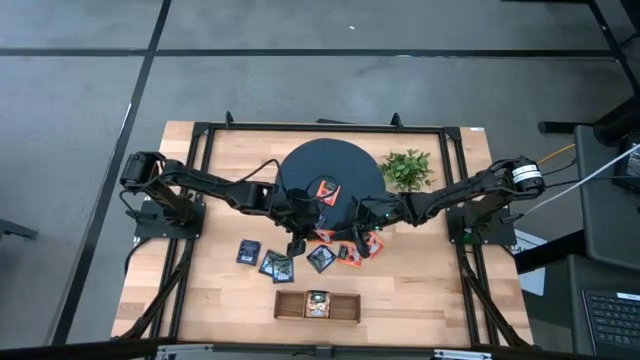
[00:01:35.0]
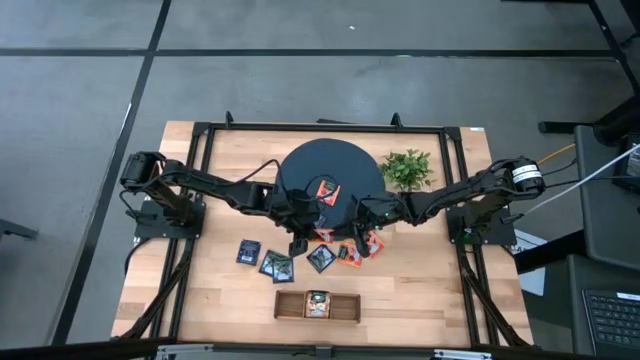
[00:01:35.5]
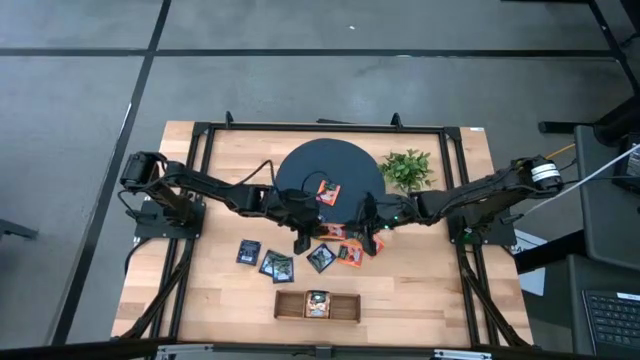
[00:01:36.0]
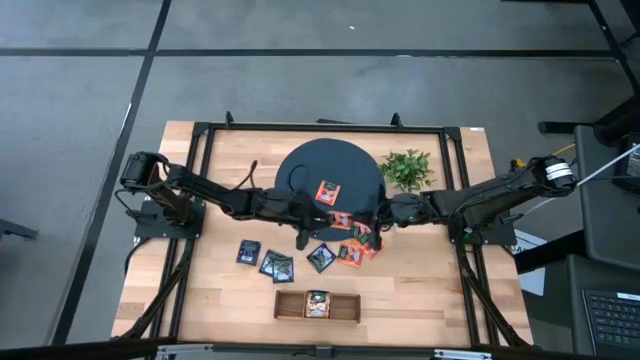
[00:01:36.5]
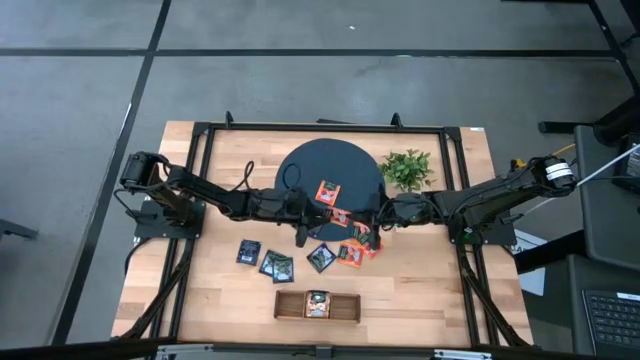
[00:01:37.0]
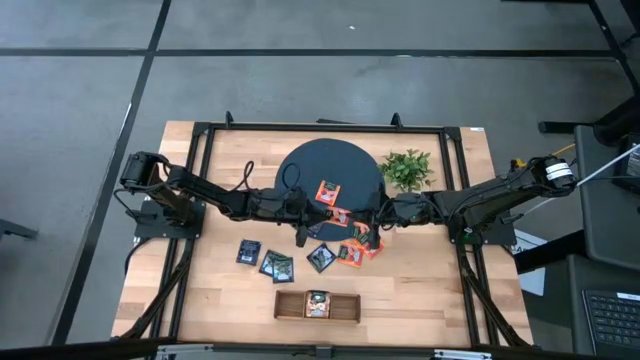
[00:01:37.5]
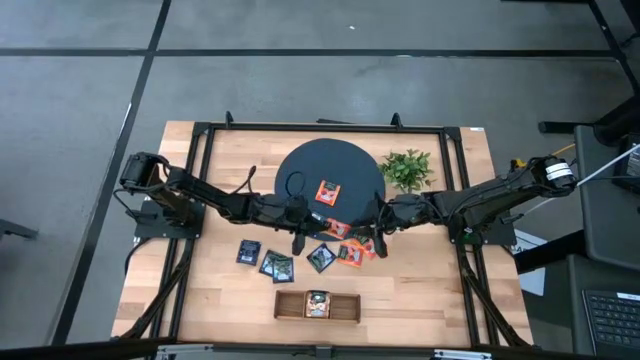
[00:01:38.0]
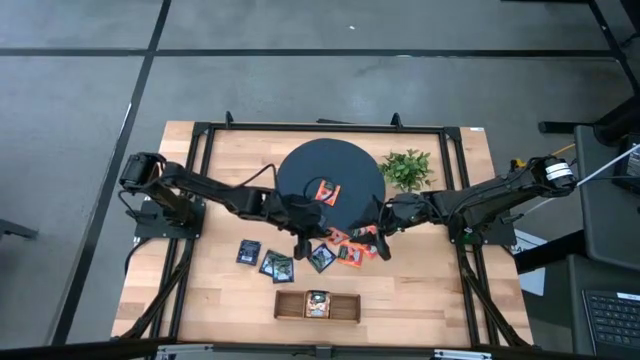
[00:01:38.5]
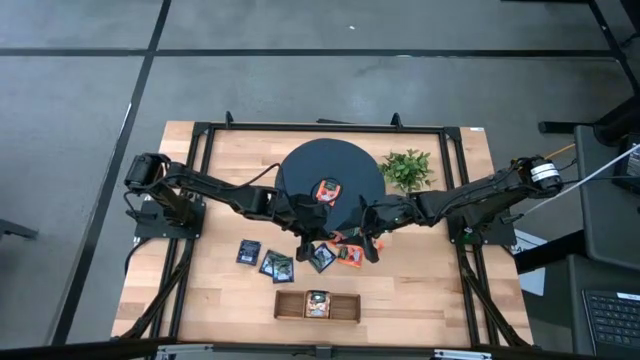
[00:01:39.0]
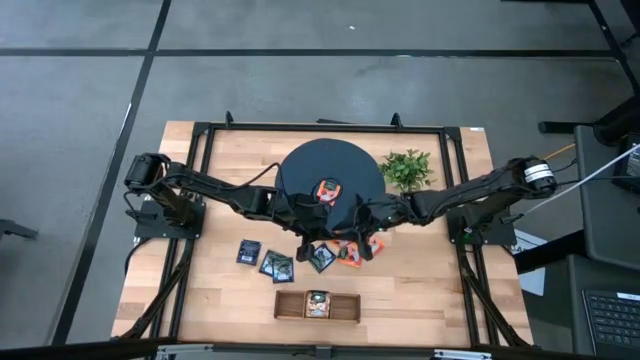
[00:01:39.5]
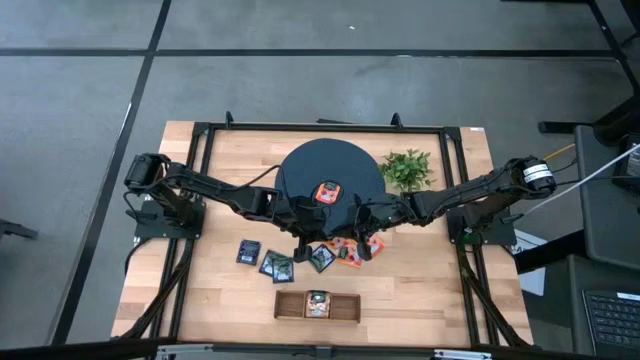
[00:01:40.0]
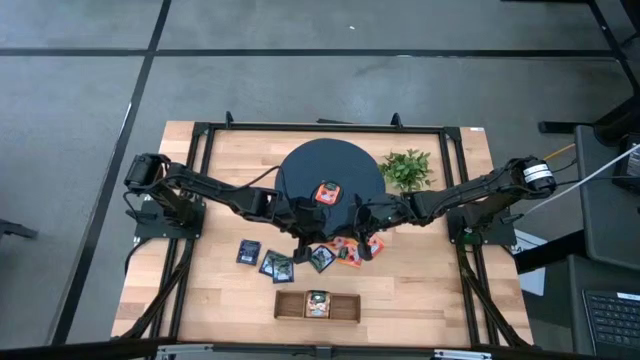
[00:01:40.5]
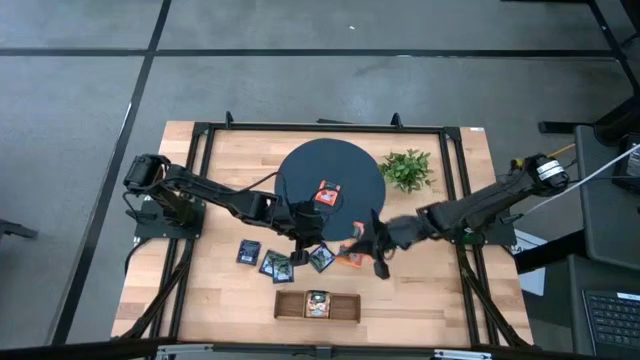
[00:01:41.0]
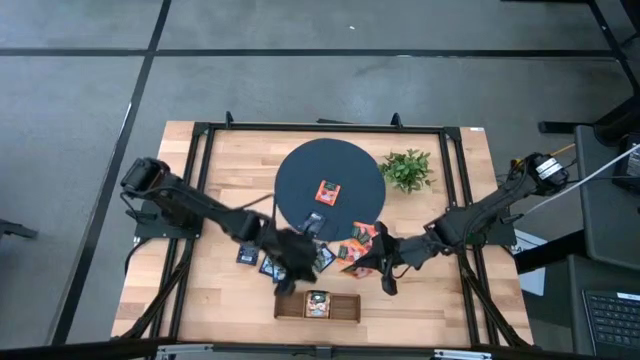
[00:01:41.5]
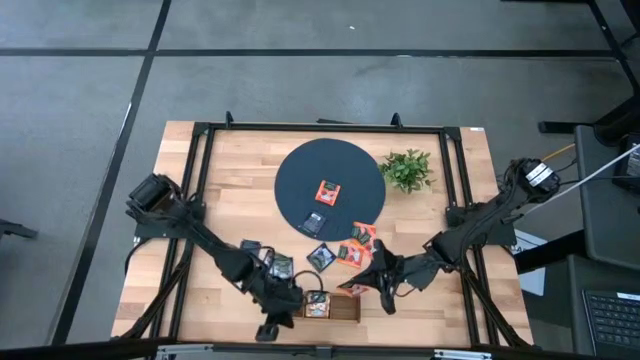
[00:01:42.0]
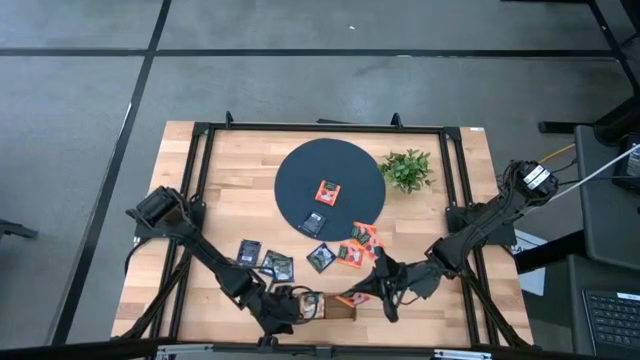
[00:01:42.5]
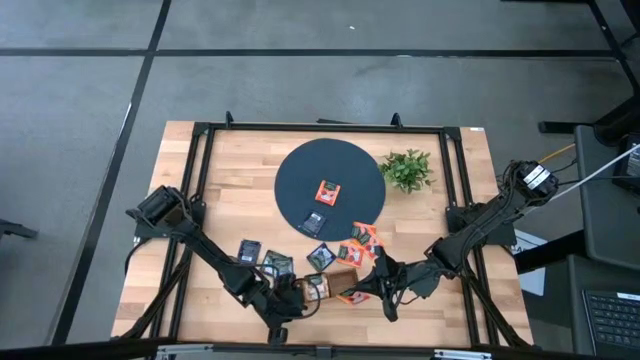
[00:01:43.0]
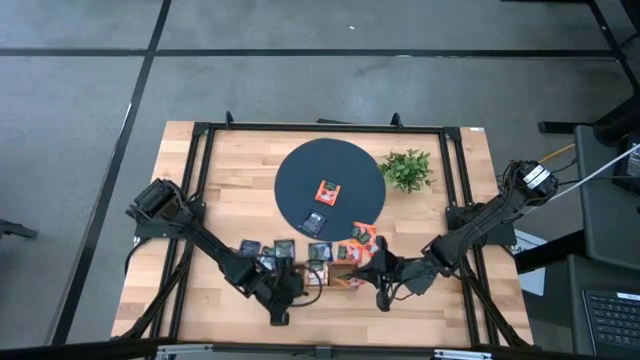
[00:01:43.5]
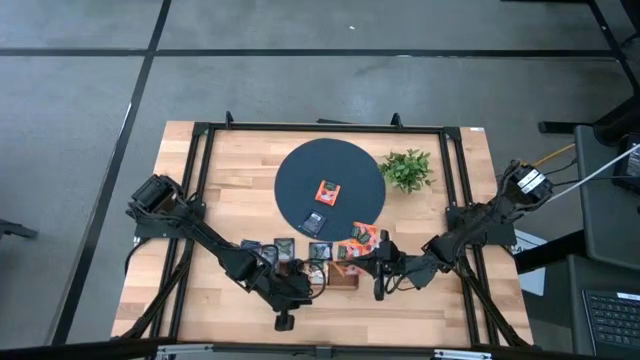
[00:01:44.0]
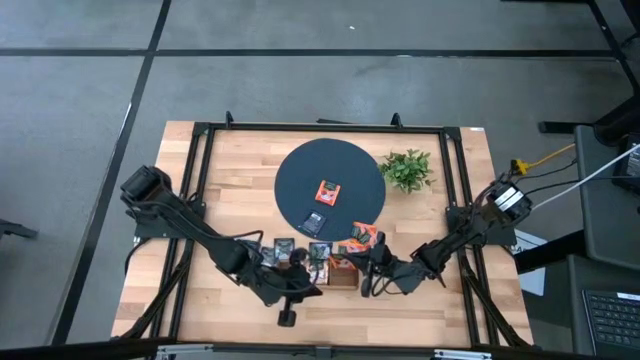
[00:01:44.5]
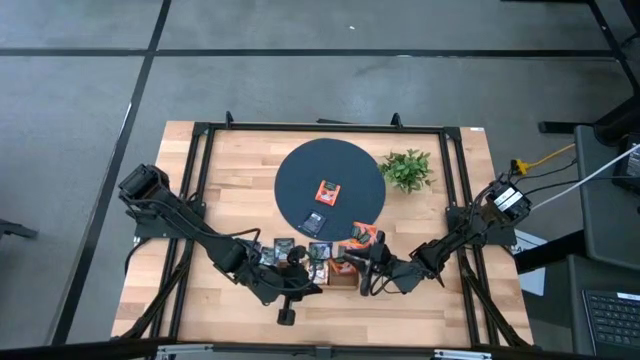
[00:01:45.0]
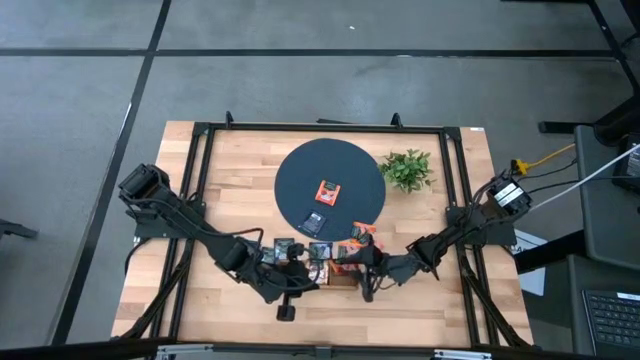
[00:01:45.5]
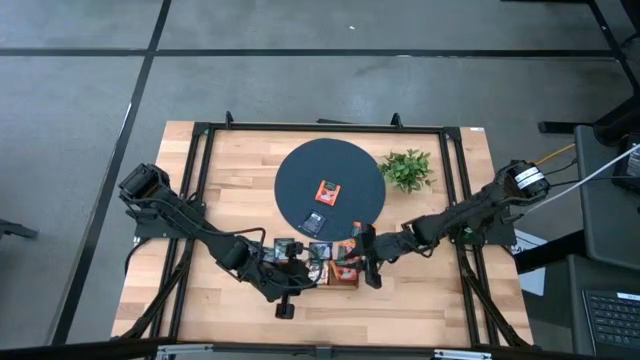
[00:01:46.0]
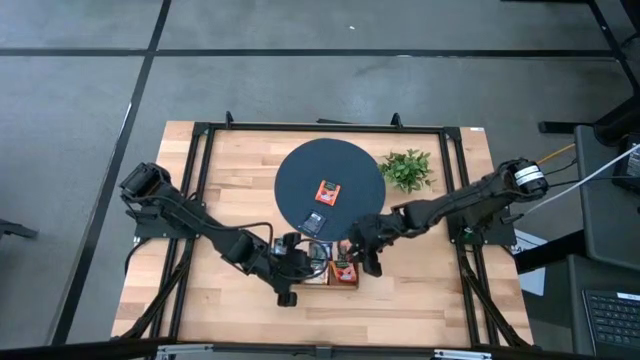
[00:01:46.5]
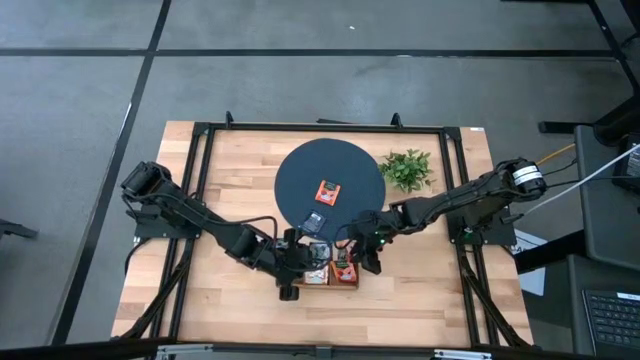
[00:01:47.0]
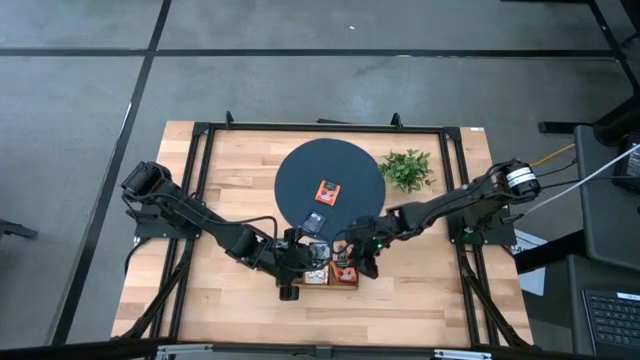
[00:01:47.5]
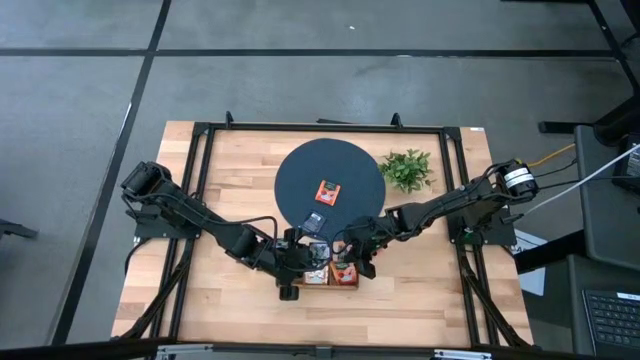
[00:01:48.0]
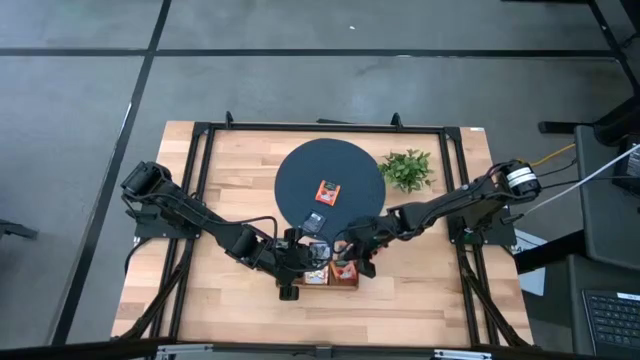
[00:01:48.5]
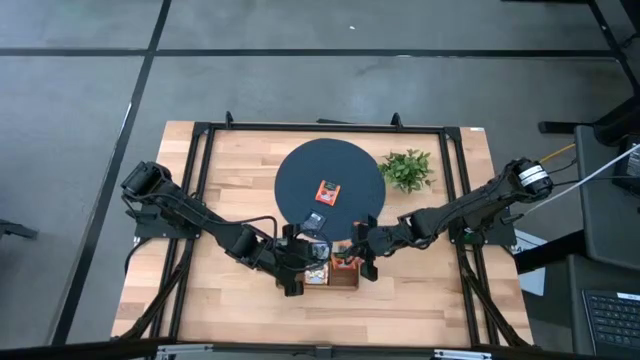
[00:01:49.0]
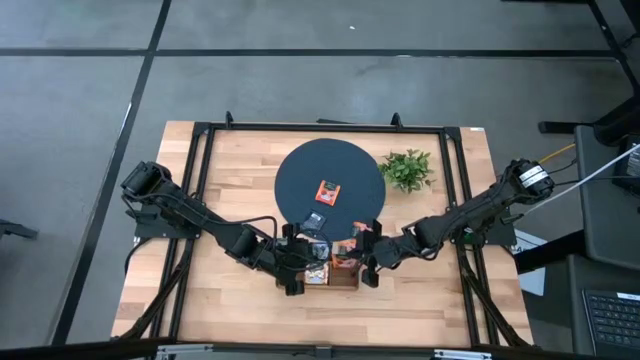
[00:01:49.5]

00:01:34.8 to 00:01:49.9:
Task: Pick & Place Tea
Put the orange tea bag into the right section of the wooden organizer
